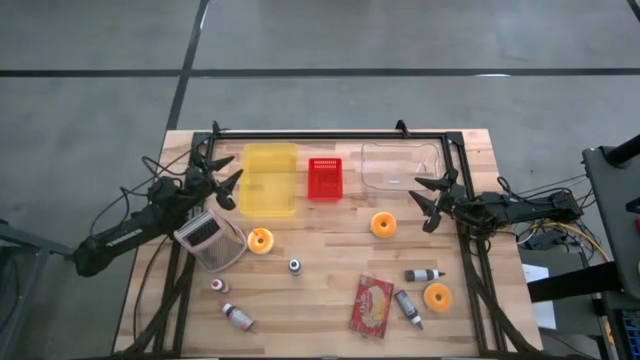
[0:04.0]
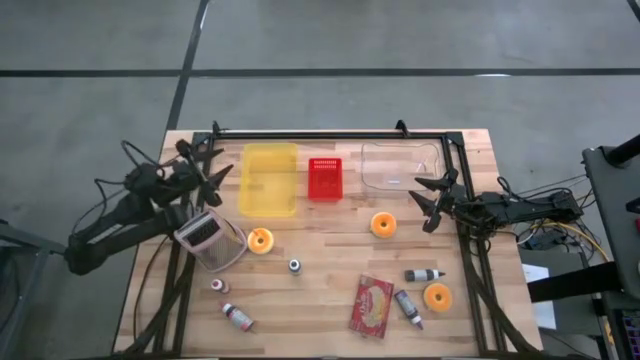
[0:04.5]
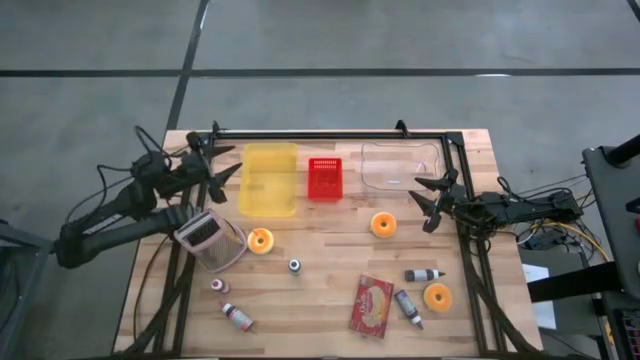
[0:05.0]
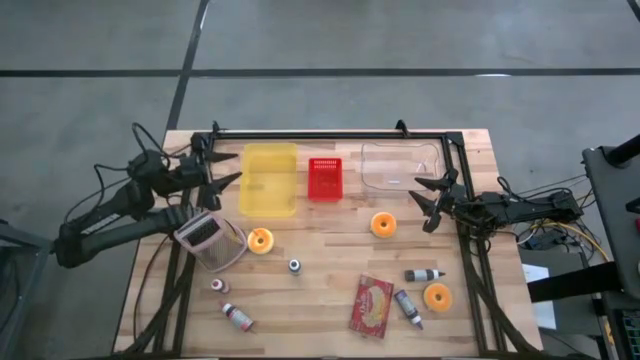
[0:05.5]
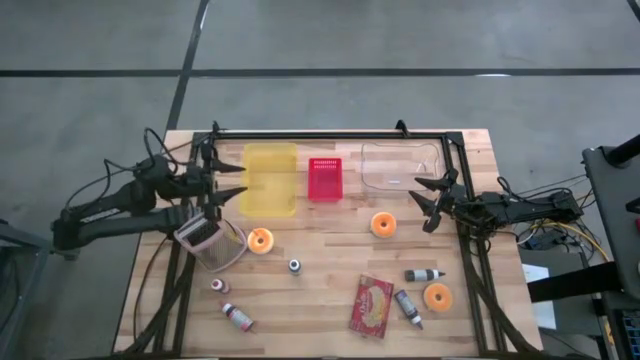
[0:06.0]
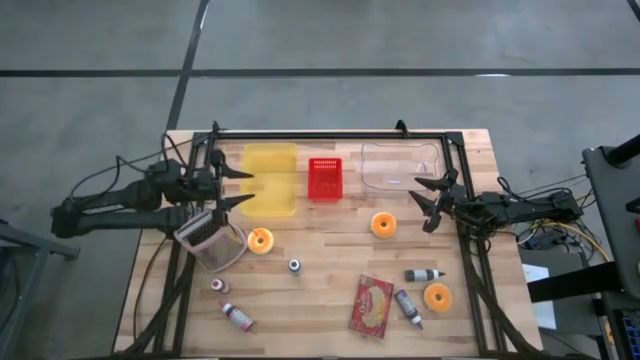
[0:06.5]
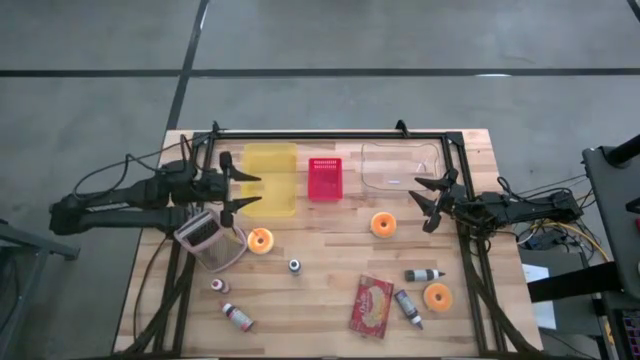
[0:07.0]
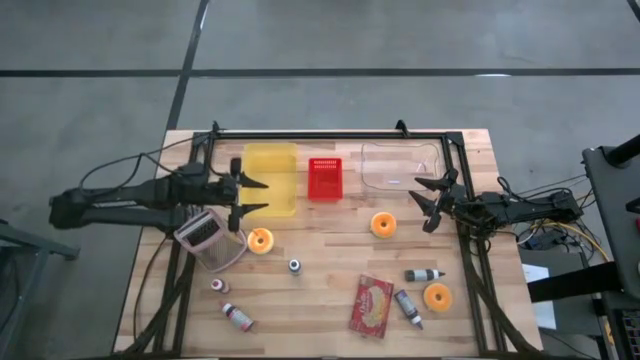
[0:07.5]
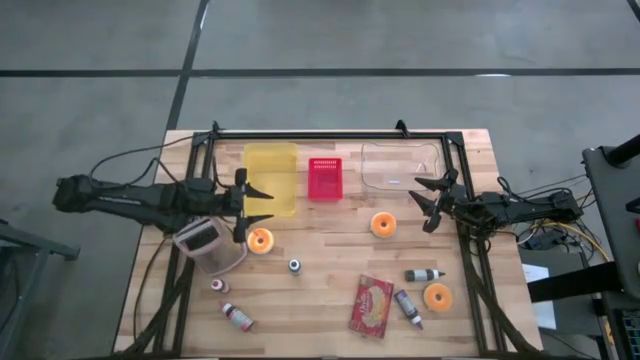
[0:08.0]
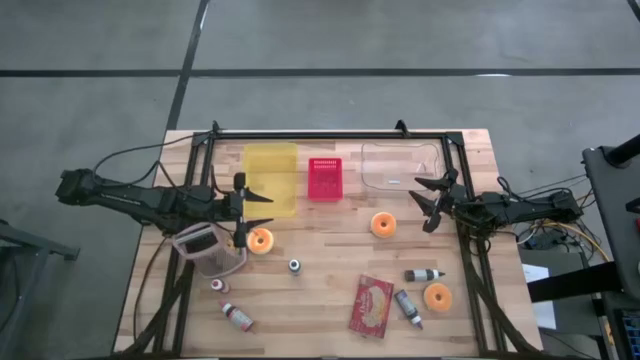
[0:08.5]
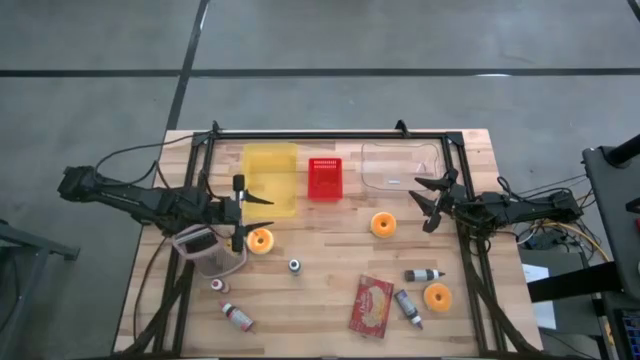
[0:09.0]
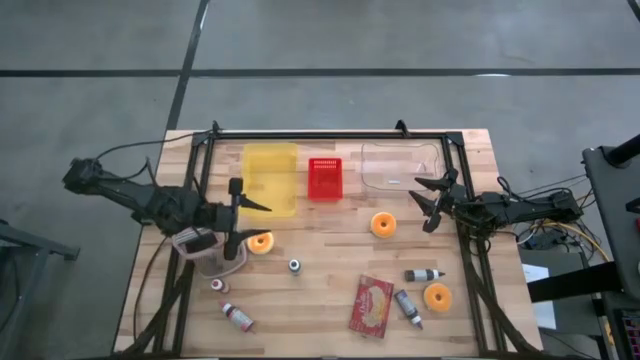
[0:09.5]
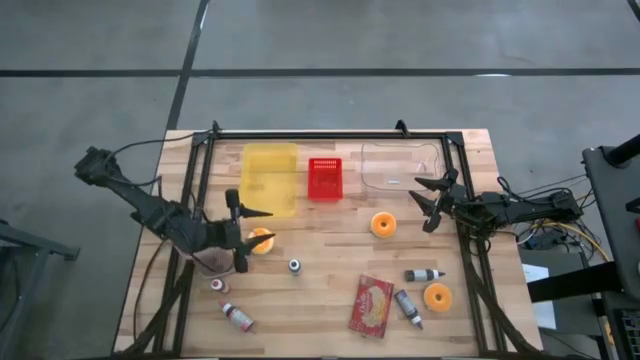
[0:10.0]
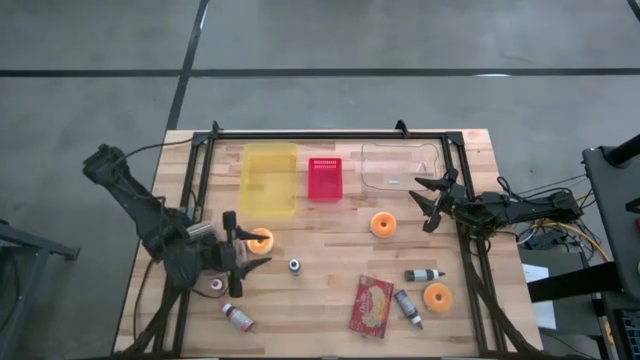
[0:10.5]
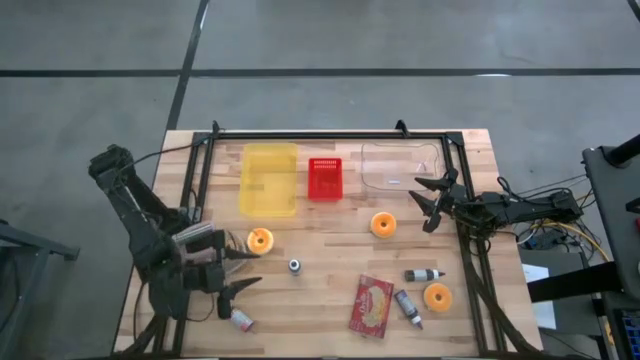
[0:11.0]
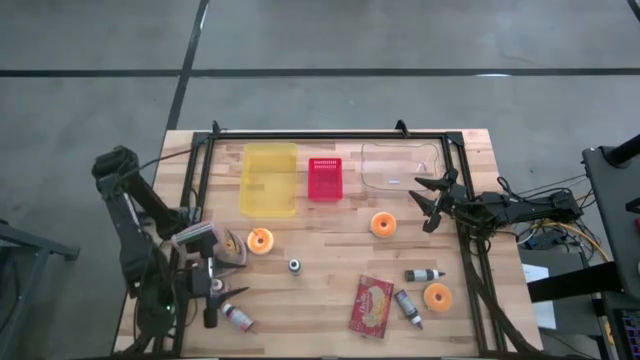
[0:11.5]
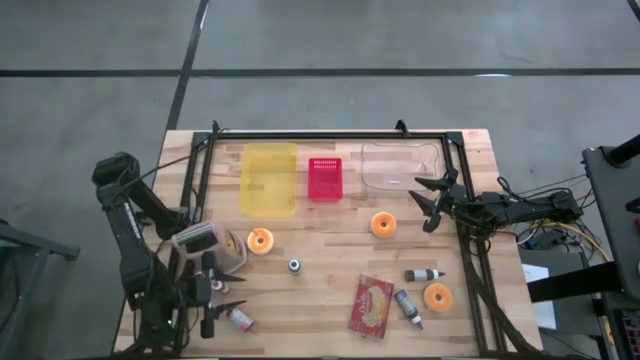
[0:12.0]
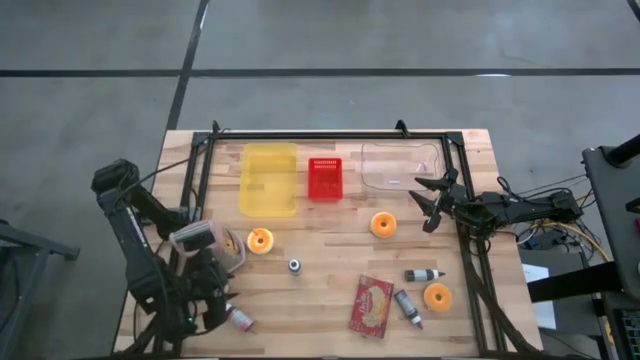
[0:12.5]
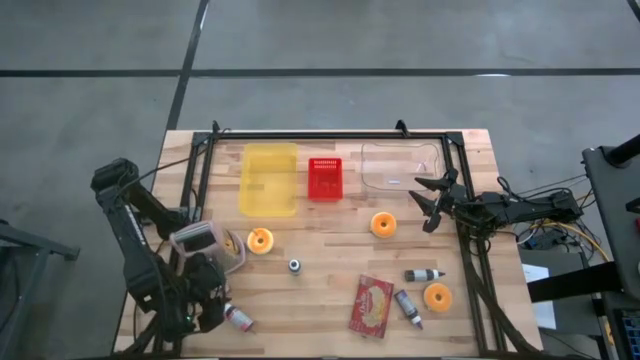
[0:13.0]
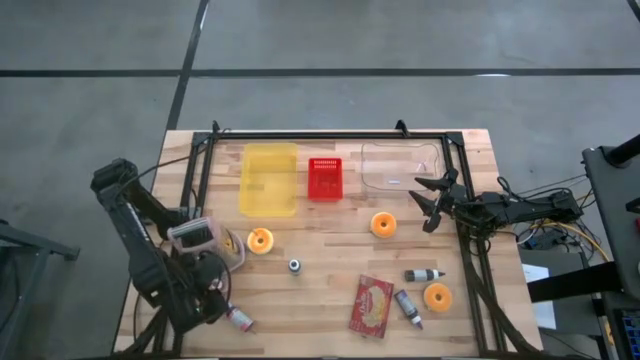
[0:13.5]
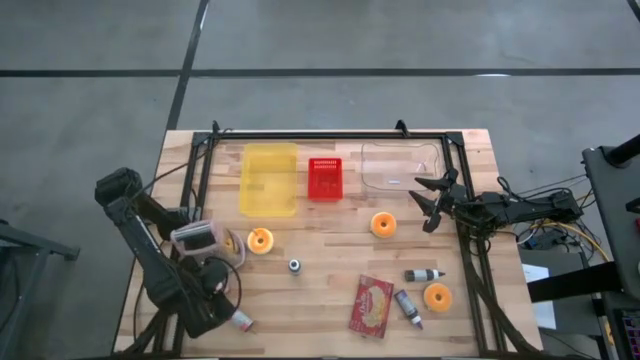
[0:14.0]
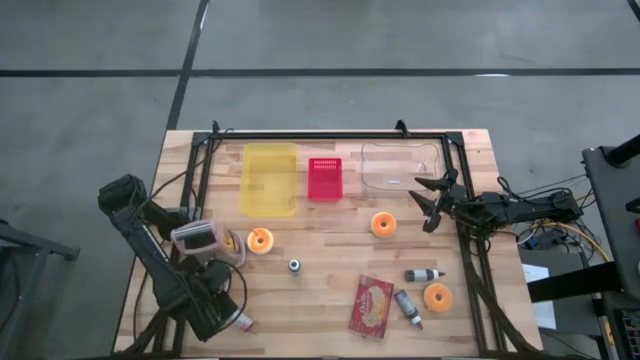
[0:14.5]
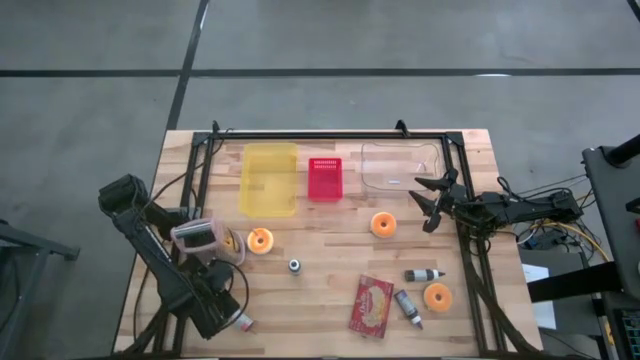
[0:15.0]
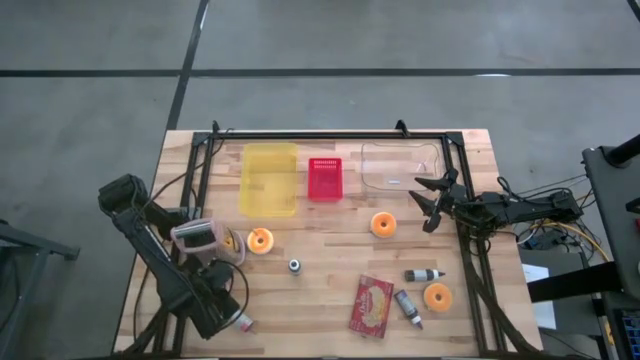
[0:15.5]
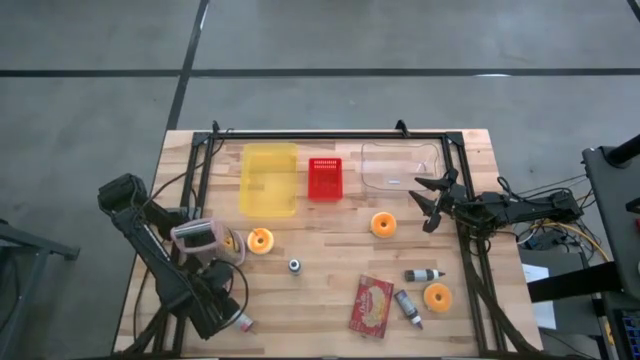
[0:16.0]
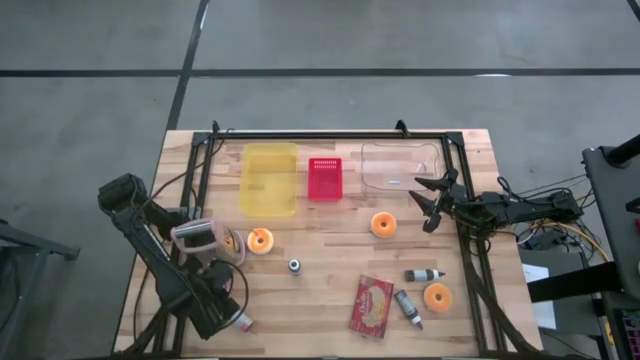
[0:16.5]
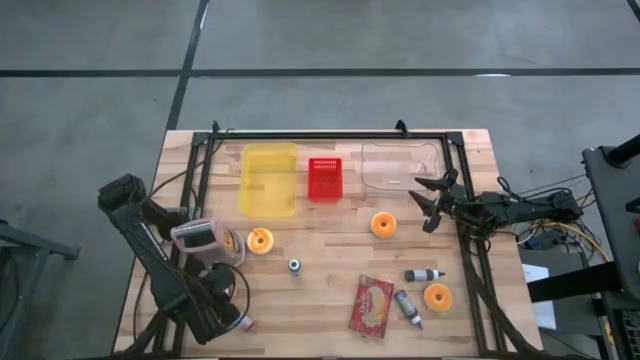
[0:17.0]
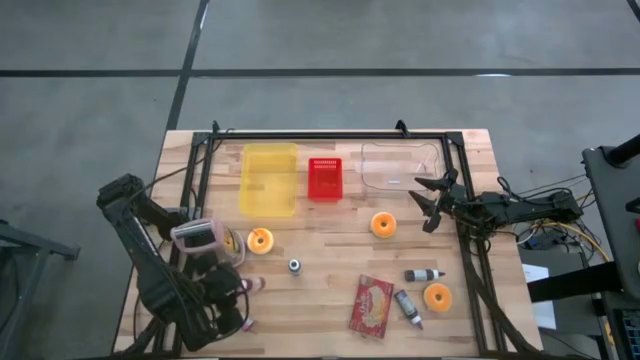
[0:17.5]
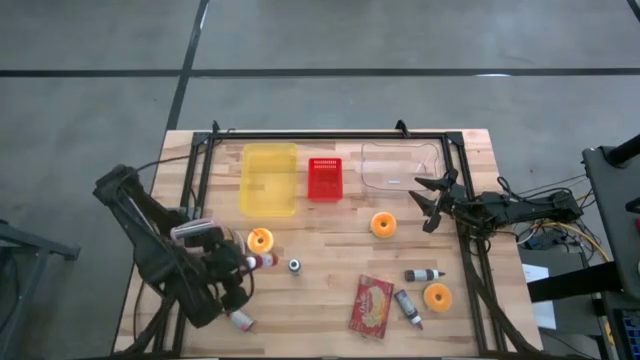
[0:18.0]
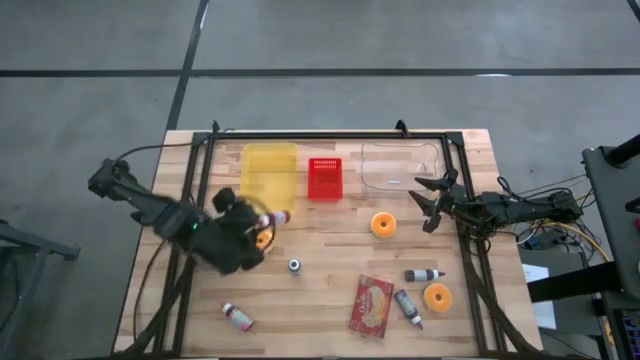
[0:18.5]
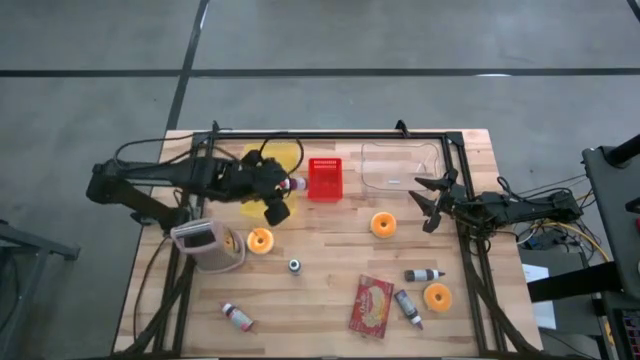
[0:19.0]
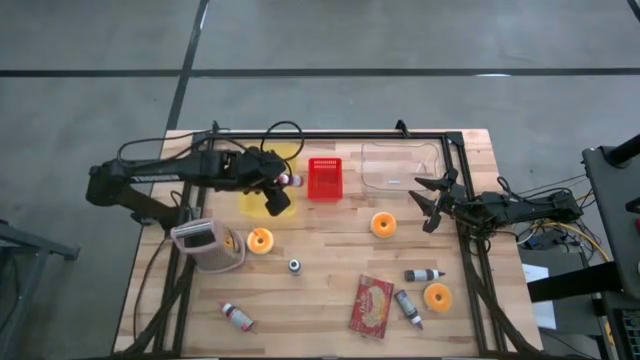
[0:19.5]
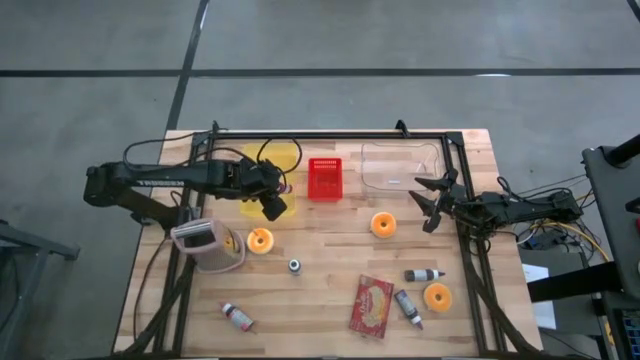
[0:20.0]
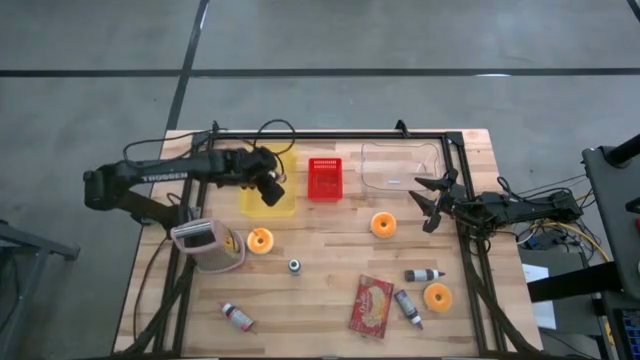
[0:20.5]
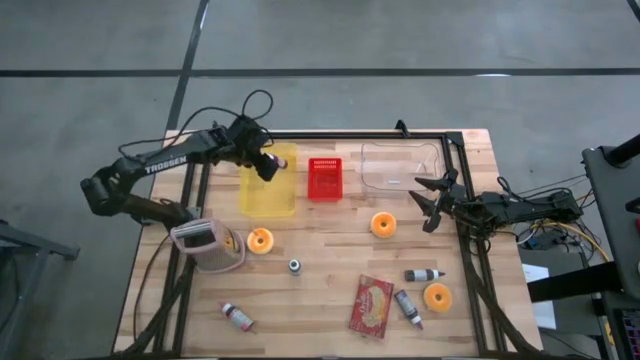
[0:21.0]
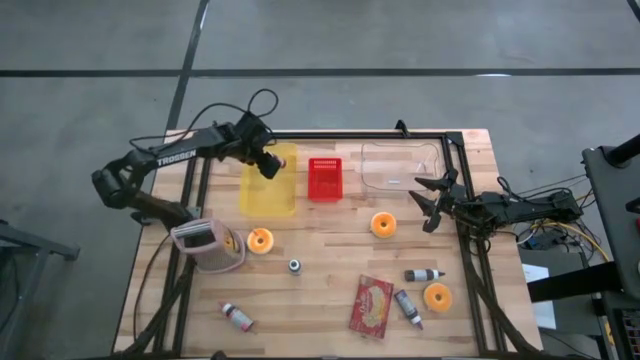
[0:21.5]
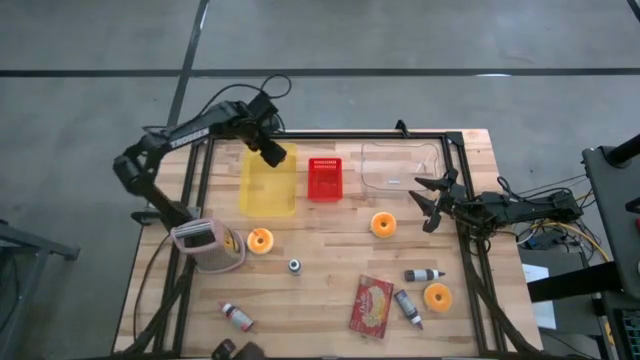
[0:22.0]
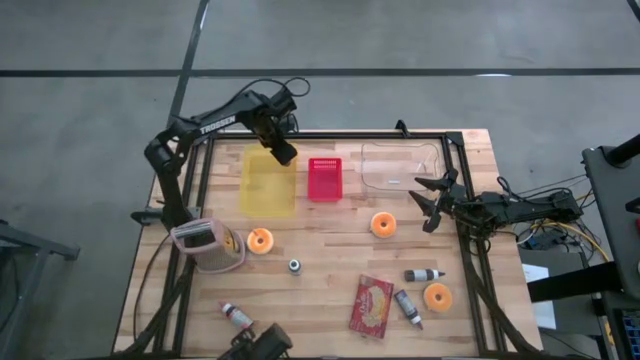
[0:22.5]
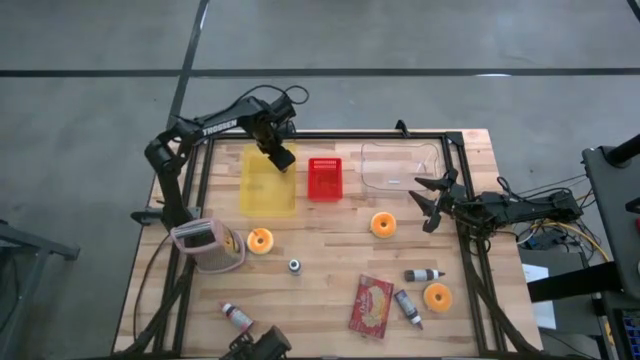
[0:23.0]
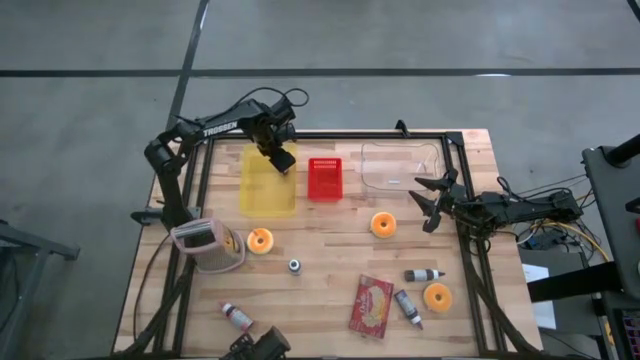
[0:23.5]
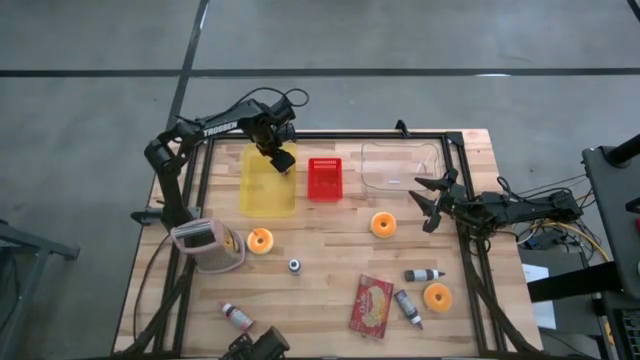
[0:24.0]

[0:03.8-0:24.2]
Task: Pick & Place Food Item
Put the red food coloring bottle into the yellow bin
